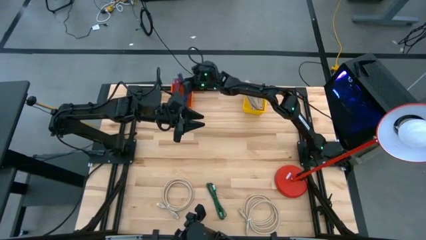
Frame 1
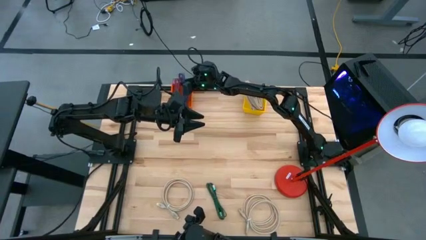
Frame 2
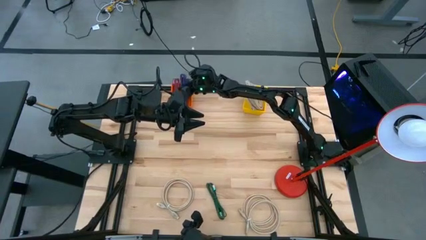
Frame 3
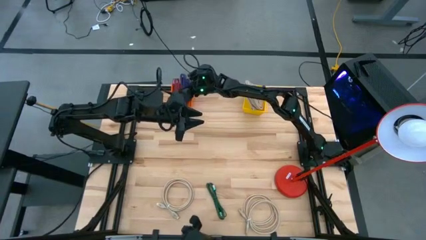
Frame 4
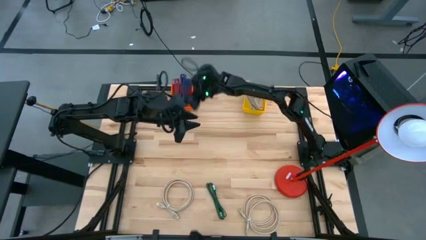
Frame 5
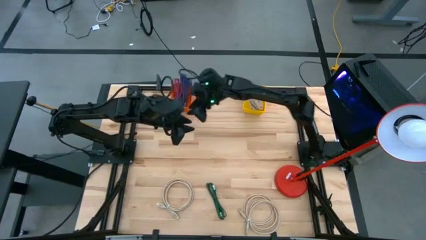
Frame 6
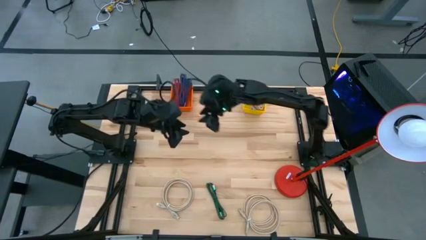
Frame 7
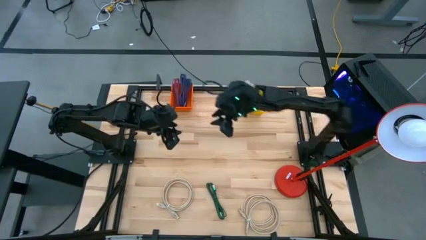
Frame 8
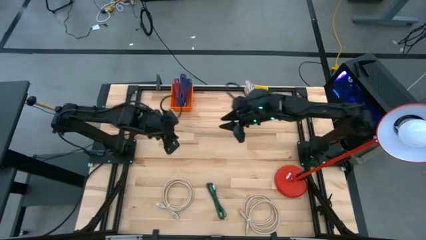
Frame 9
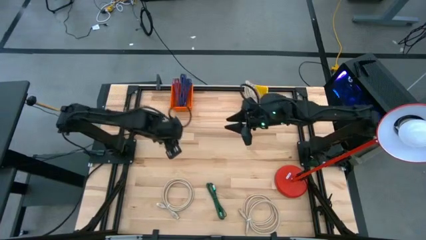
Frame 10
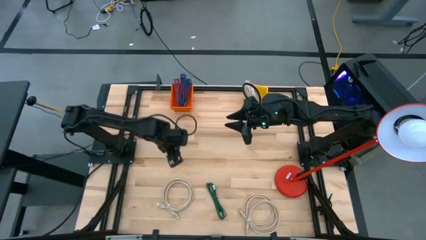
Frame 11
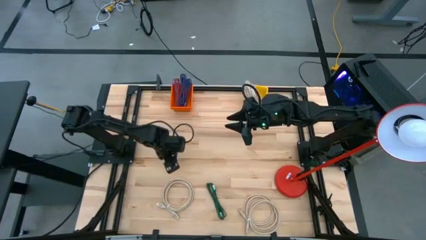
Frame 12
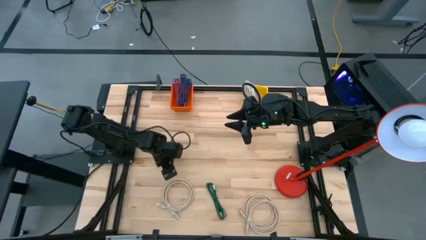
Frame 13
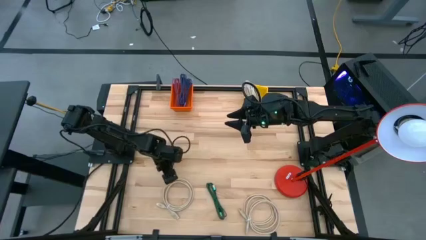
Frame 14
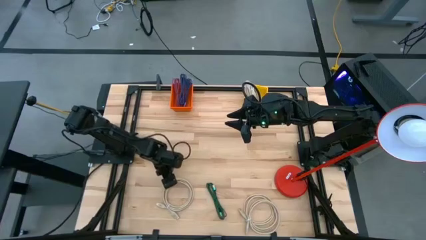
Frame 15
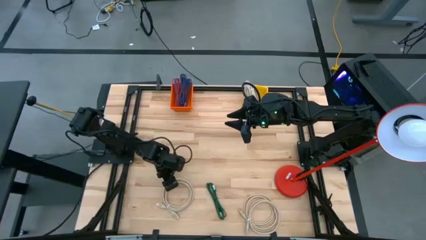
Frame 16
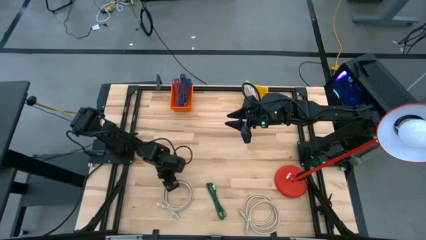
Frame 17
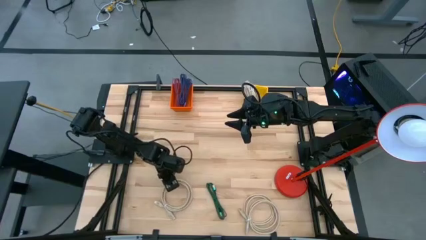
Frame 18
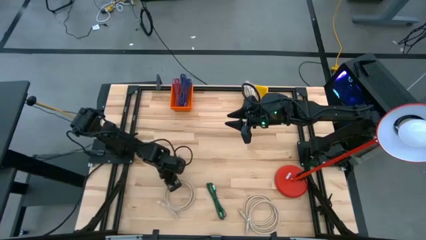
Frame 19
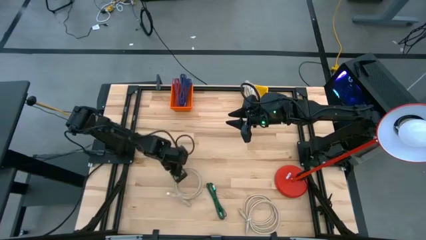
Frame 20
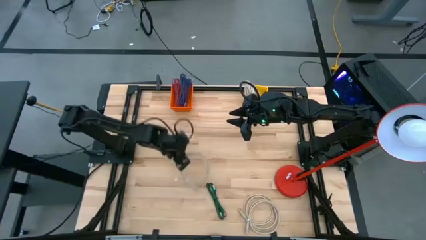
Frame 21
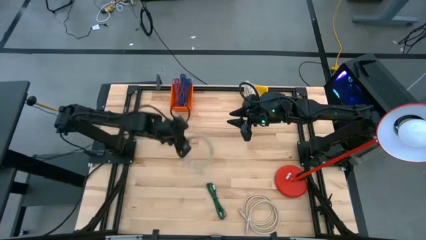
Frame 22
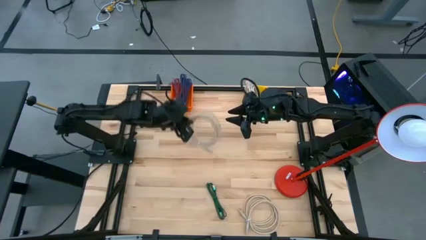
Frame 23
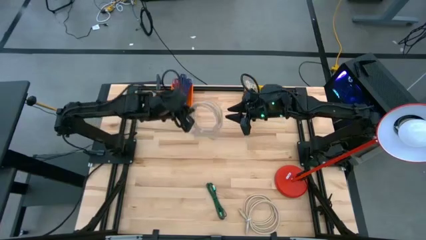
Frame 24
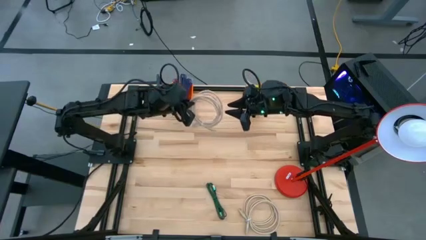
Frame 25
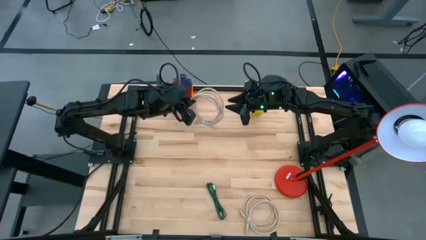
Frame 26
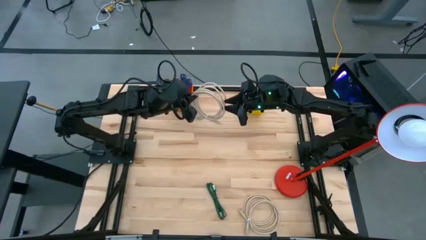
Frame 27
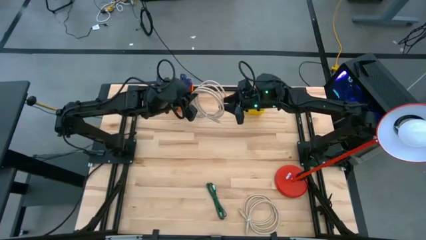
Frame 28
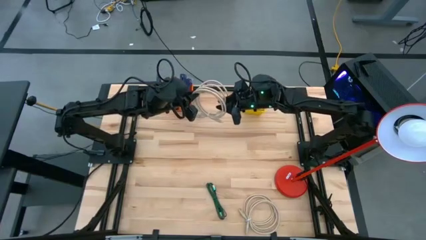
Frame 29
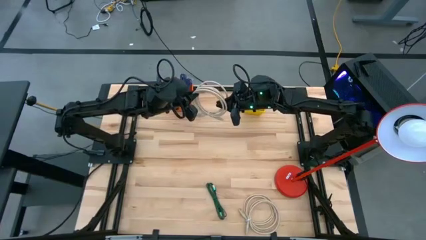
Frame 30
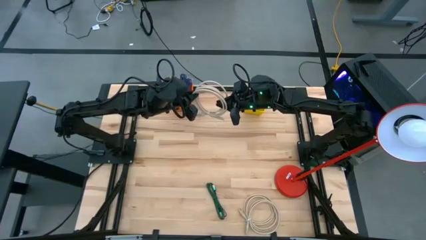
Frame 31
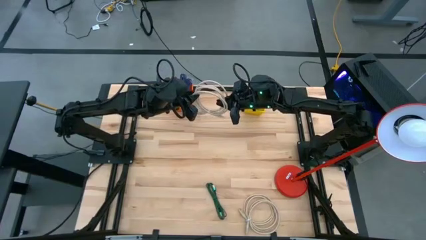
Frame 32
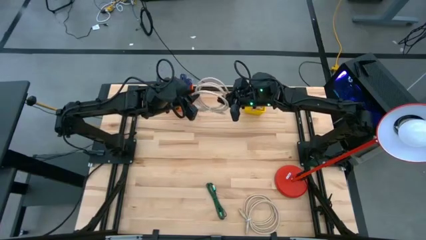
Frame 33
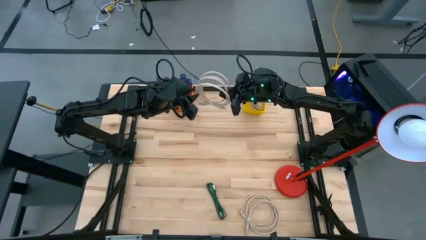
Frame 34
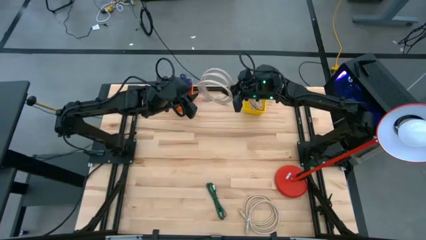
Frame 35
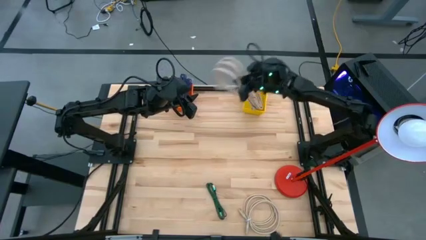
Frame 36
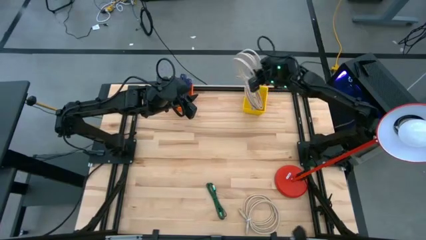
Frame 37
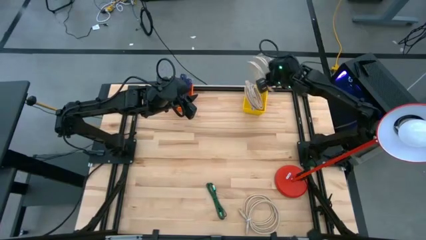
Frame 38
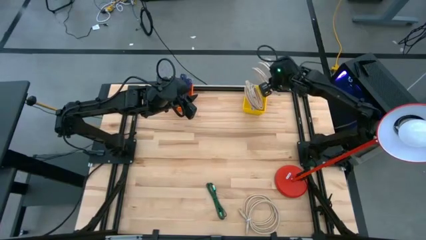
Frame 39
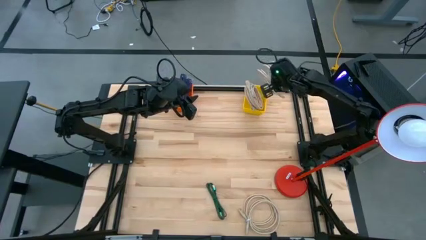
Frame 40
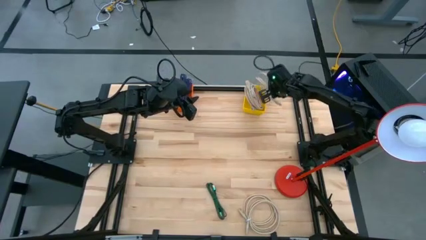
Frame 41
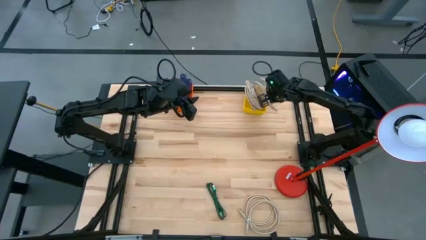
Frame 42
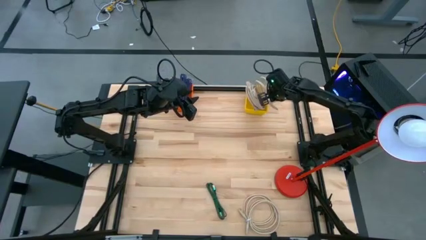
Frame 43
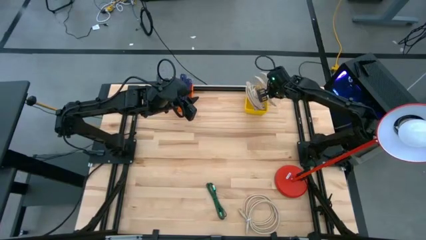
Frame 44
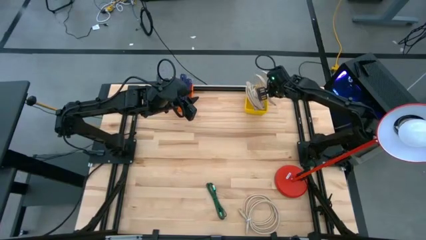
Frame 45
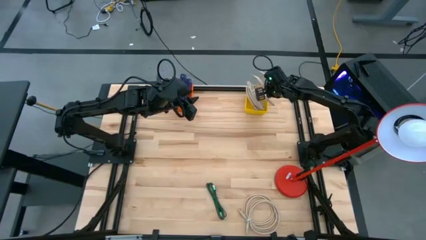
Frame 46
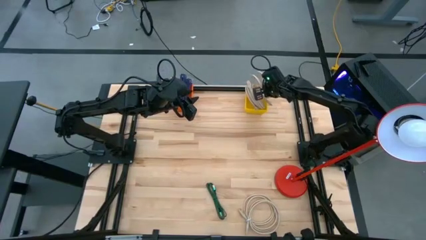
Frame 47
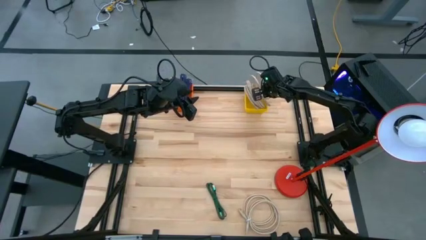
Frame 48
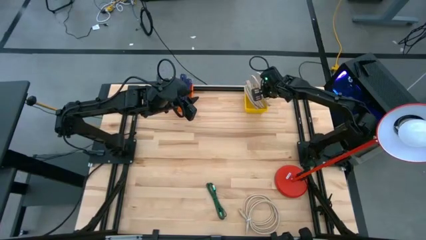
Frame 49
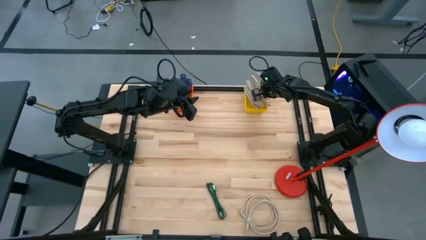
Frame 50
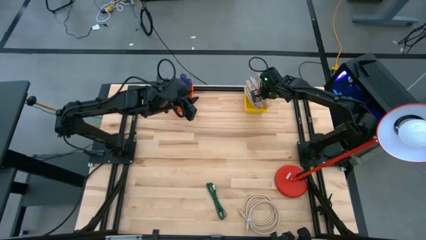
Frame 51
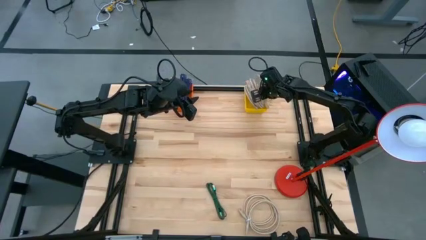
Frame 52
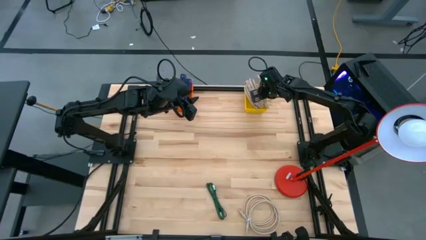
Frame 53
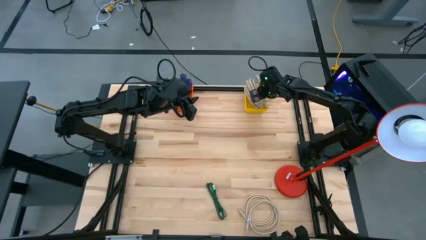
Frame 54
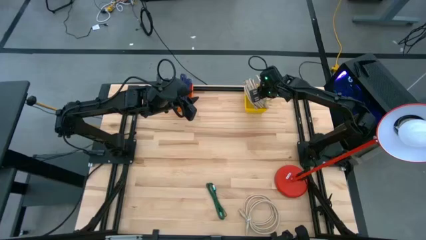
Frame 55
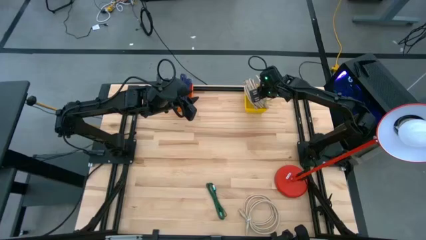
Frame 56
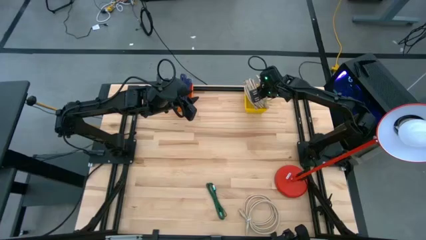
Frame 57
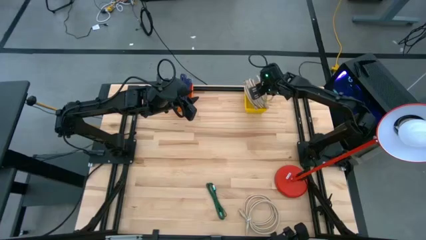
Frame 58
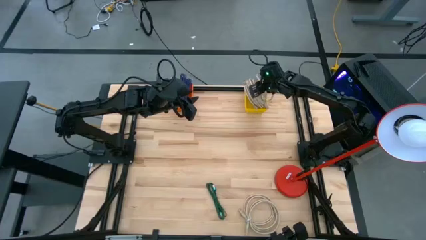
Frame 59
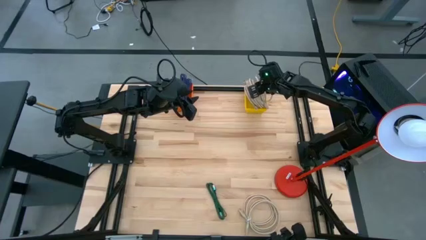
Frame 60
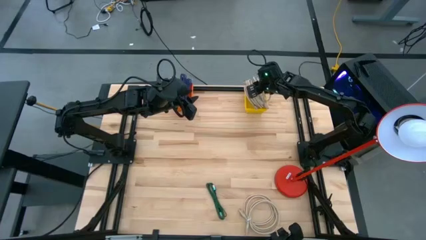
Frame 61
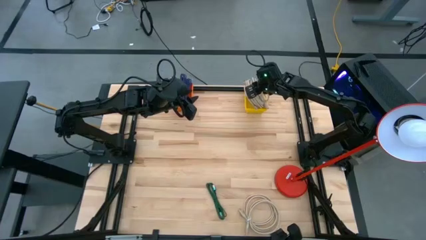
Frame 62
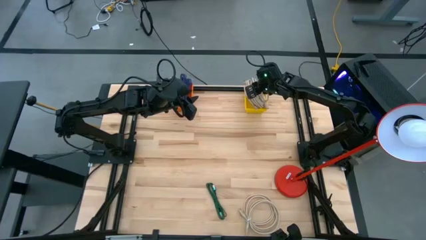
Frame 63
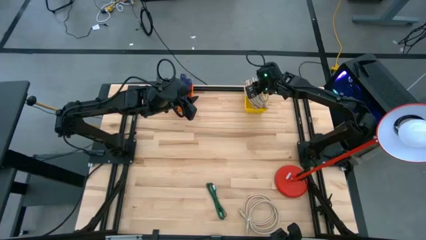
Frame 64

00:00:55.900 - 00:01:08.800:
Task: Pick & Place USB Port
Put the brown HDMI cable into the yellow bin

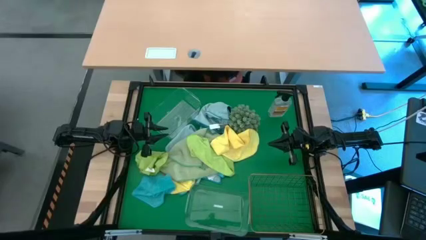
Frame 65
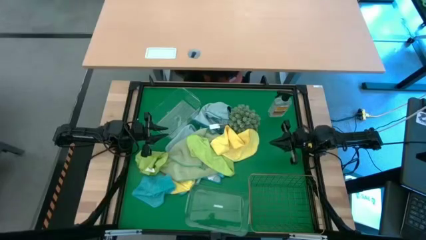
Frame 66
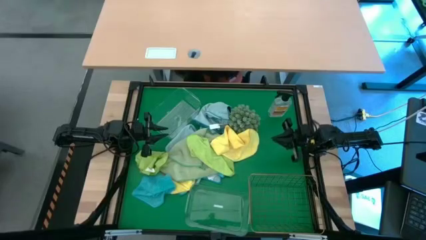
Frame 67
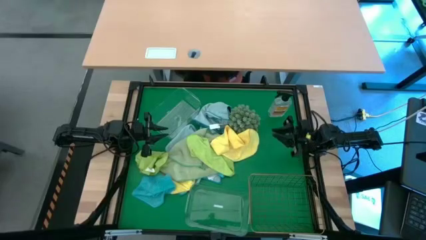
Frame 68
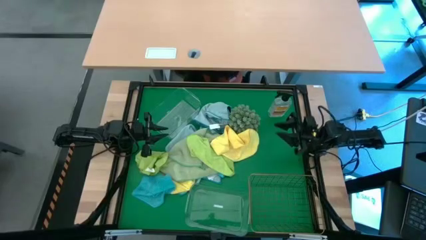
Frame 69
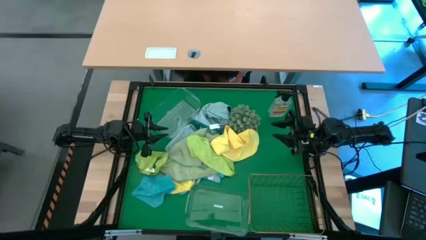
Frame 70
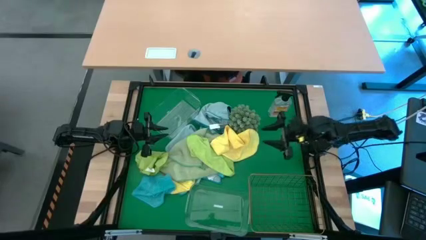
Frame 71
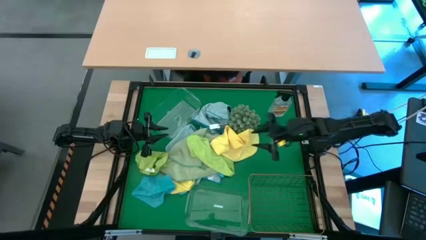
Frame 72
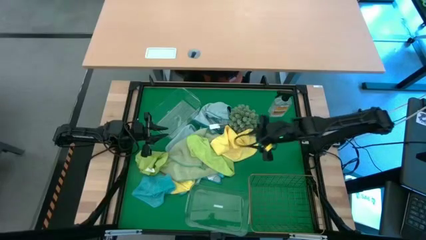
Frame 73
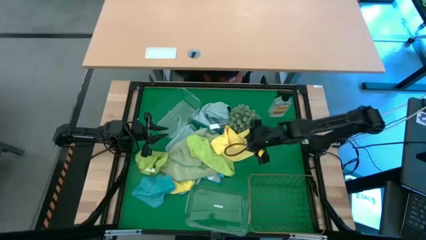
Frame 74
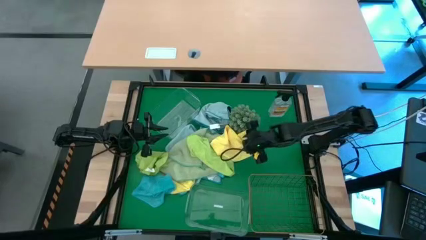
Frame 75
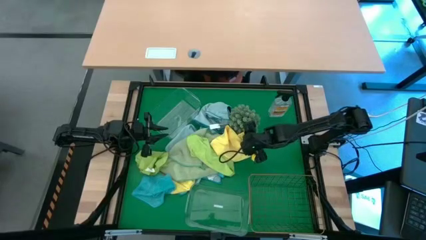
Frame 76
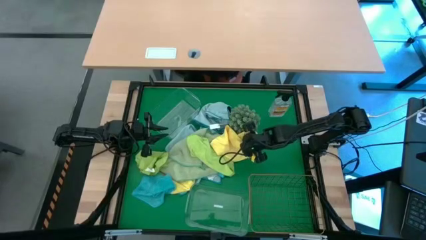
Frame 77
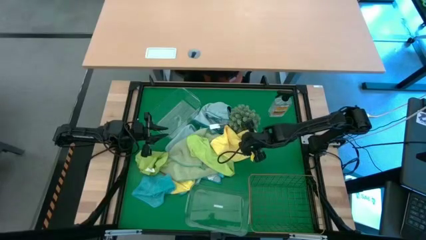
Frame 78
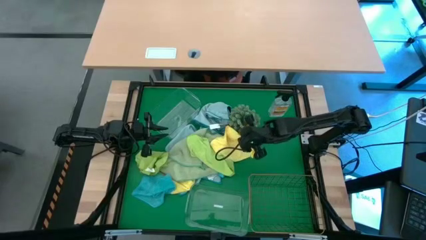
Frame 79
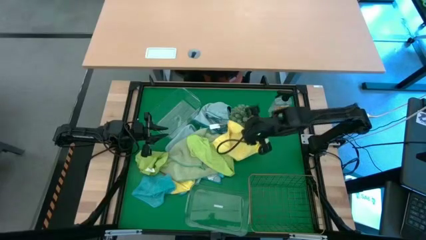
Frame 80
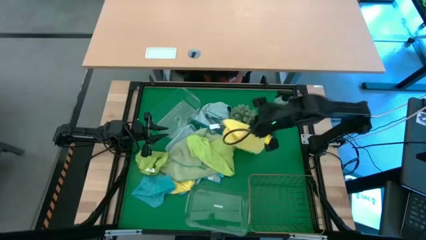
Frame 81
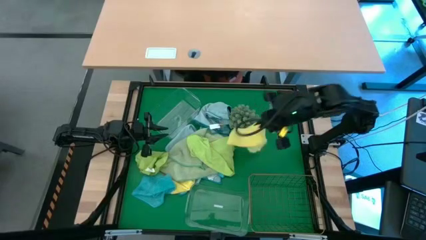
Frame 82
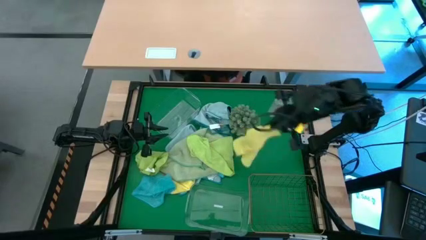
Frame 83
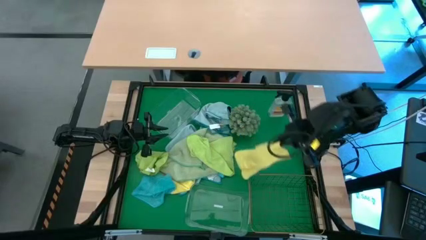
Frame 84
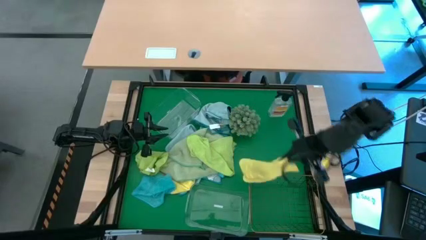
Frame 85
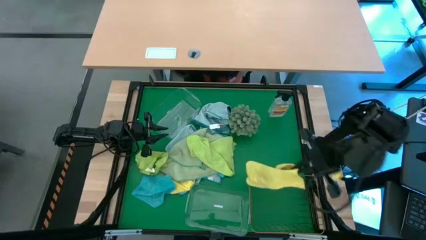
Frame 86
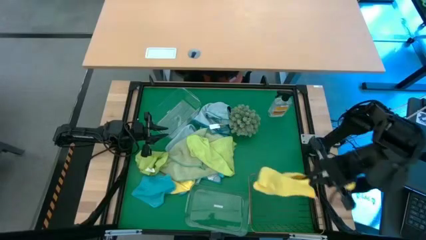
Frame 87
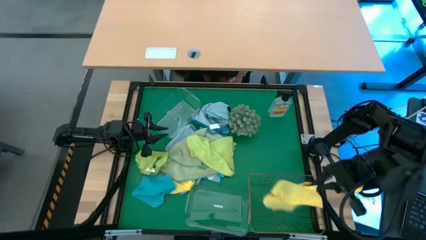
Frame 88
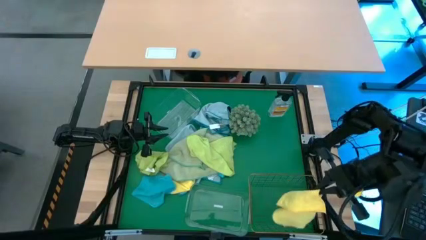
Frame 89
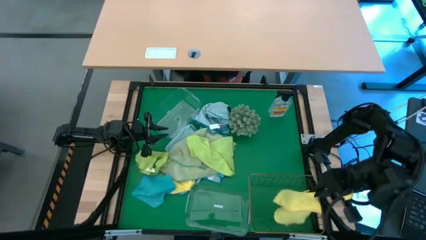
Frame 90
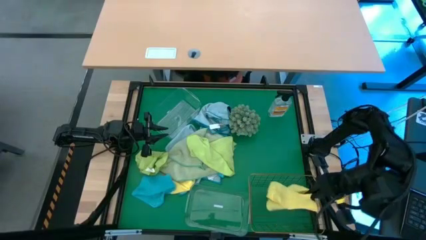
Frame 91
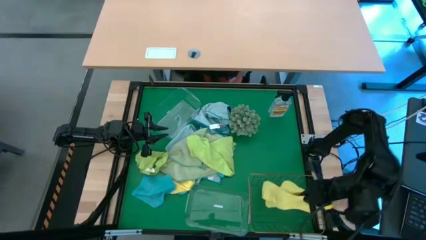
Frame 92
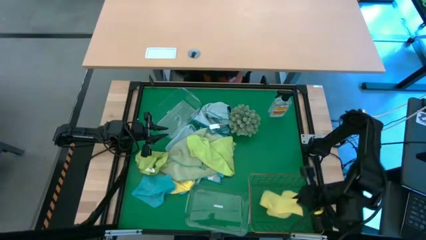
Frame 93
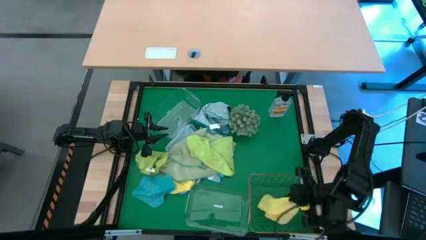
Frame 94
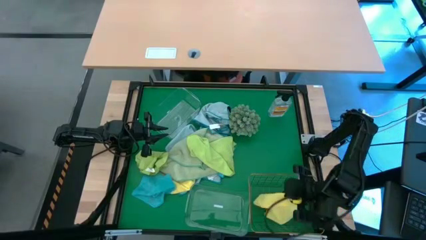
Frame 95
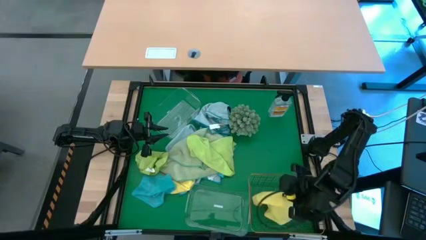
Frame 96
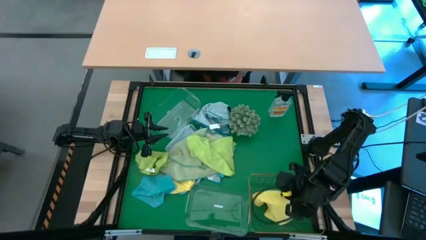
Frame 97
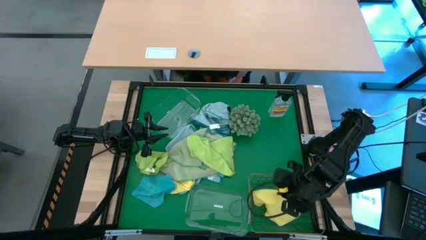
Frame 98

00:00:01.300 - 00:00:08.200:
Task: Sort microfiber towel by color & place in baskets
Put the yellow microfiber cloth into the wire basket
